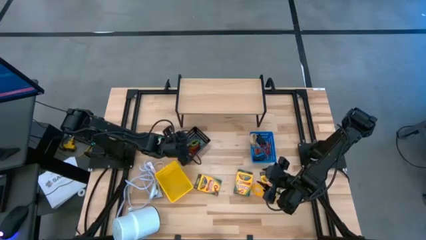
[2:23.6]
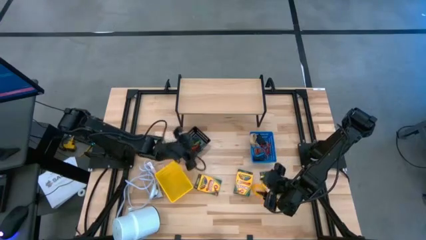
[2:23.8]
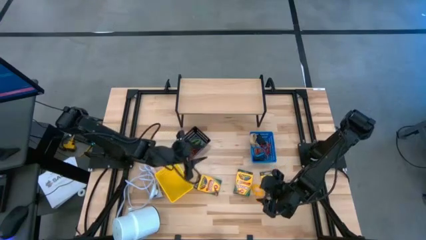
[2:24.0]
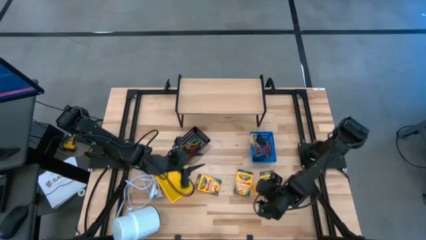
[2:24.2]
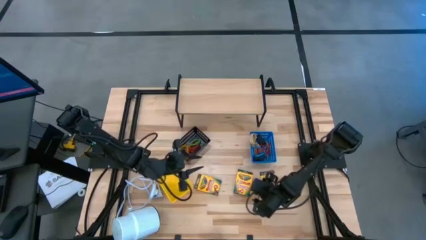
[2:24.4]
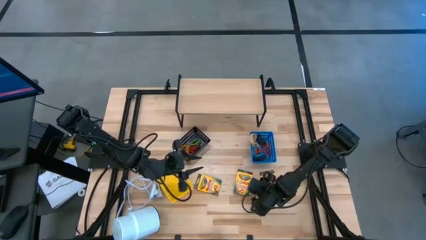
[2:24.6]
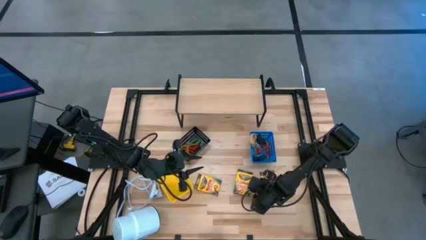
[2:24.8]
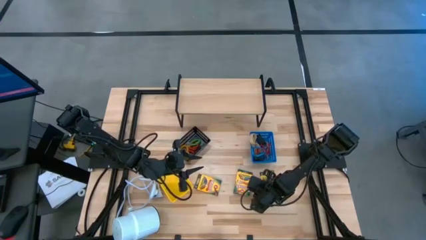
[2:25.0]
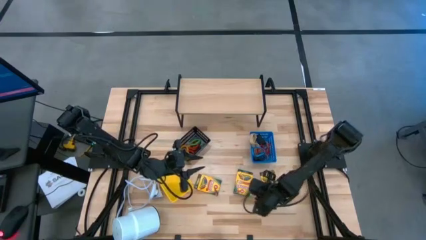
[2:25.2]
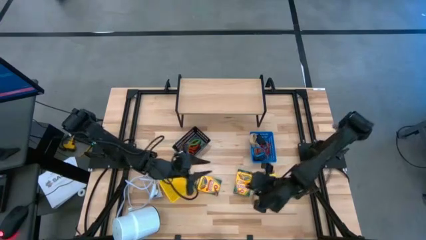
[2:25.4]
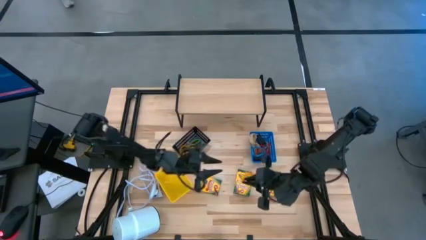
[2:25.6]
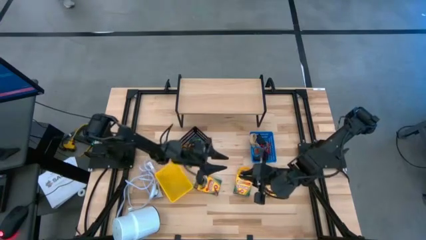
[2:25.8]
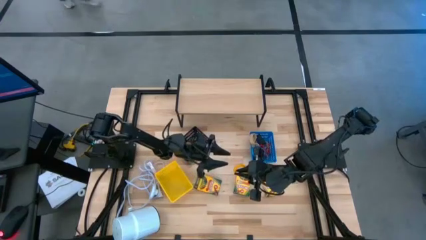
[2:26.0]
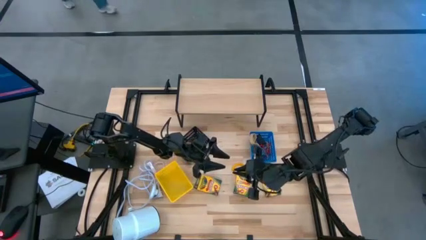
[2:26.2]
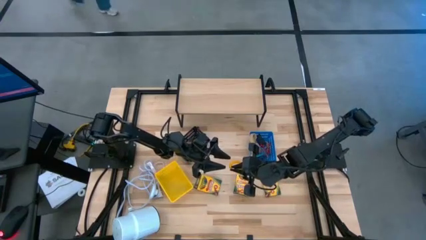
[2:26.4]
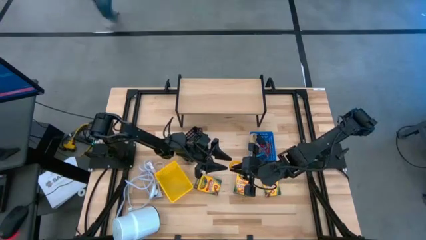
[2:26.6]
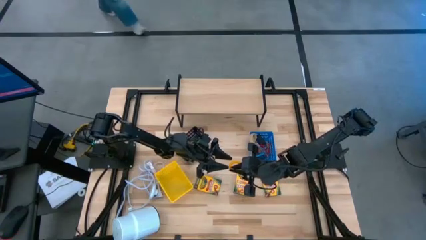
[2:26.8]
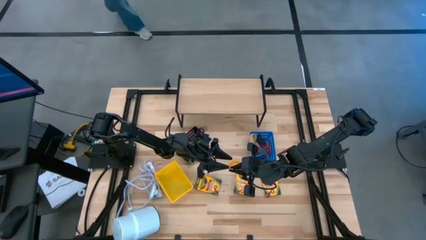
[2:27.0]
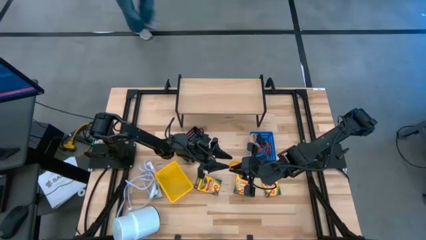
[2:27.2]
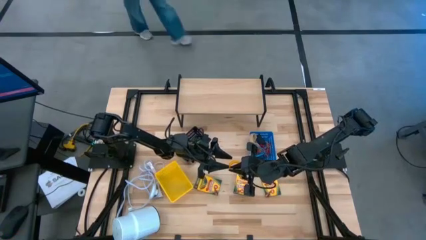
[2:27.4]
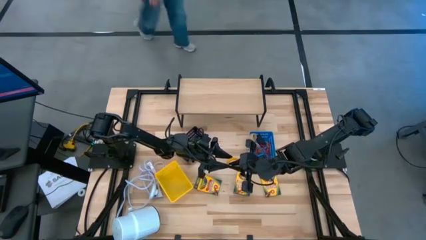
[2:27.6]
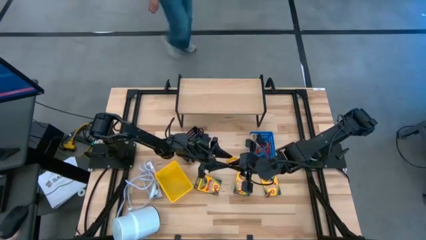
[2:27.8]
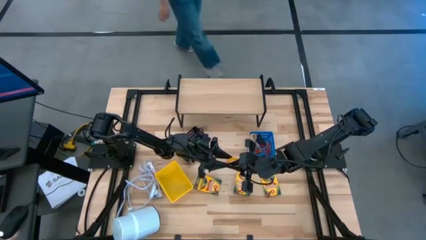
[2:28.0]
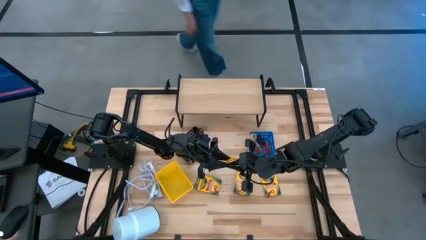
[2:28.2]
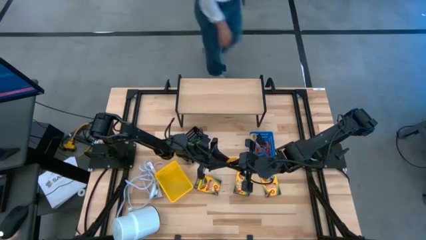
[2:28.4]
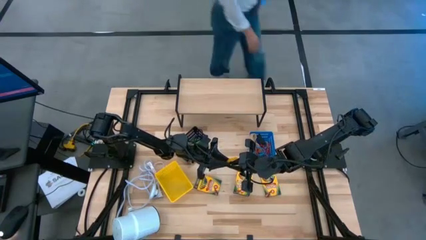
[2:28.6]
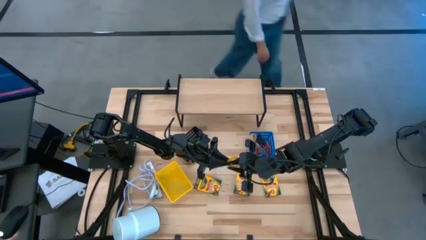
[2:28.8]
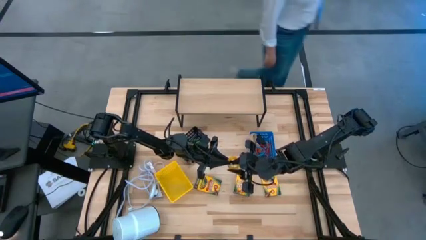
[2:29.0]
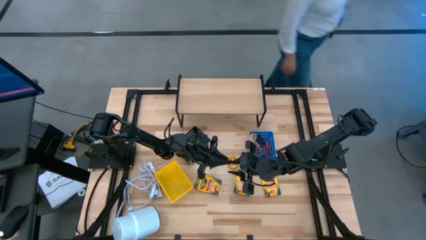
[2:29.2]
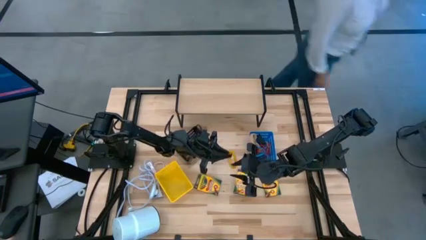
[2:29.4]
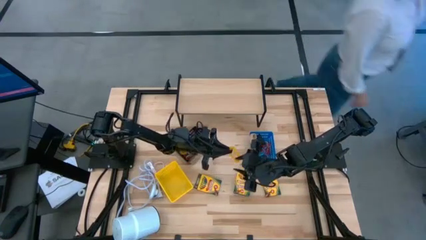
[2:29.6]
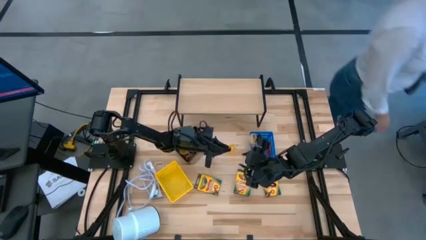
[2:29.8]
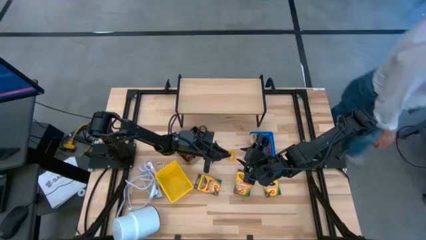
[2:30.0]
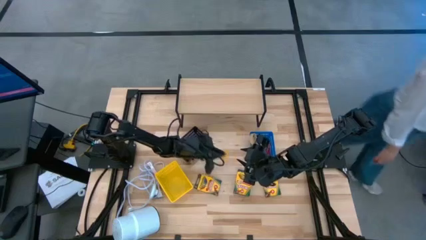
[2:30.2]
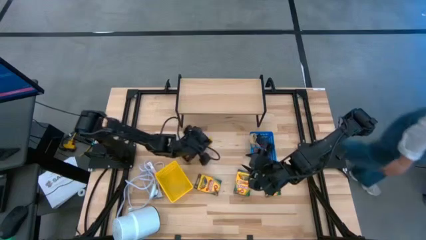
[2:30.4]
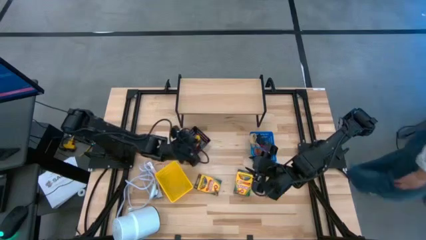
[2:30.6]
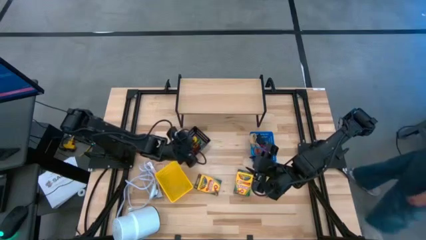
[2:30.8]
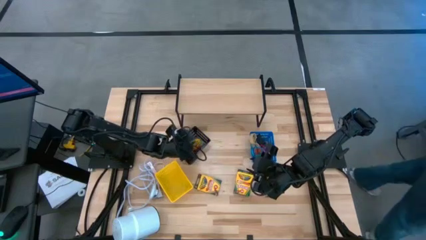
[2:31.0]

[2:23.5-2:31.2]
Task: Pick & Place Office Desk Supplies
Put the yellow spring keychain into the black bin

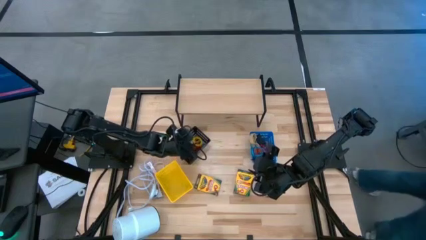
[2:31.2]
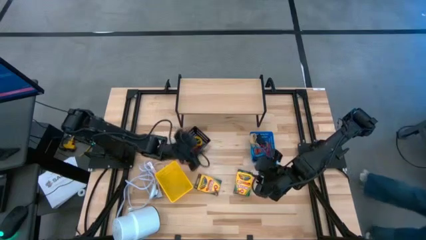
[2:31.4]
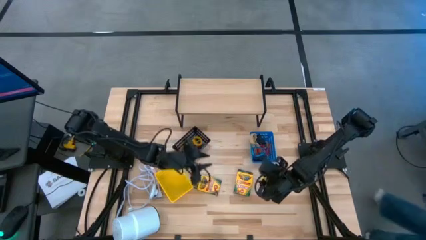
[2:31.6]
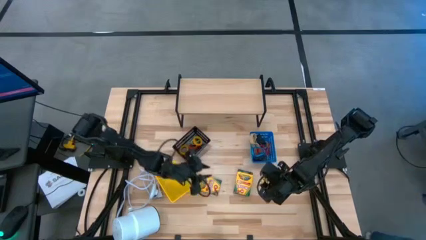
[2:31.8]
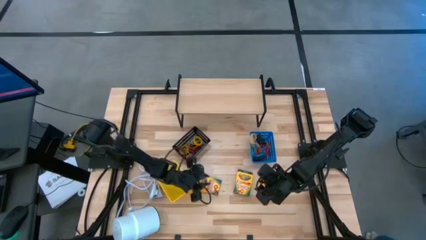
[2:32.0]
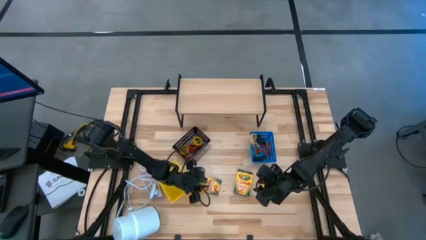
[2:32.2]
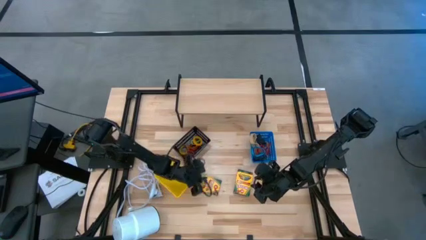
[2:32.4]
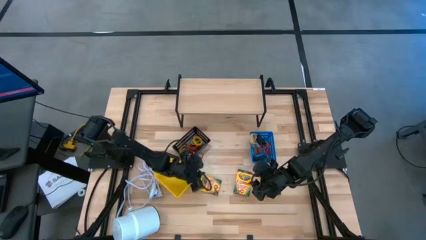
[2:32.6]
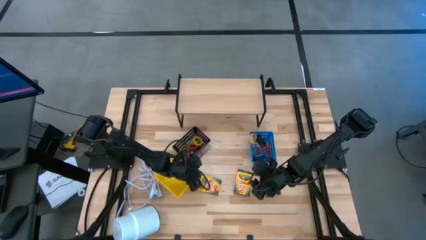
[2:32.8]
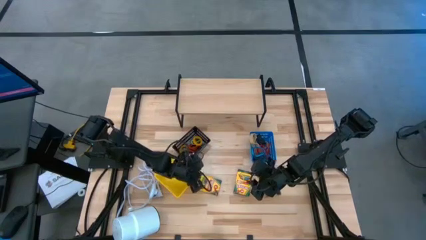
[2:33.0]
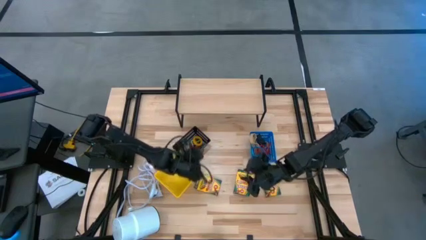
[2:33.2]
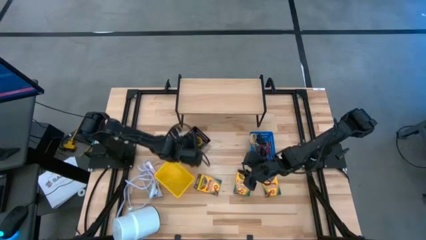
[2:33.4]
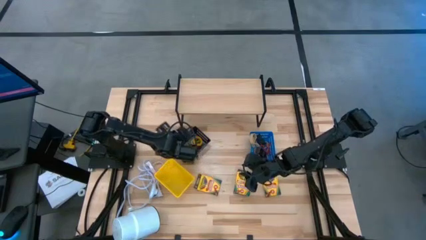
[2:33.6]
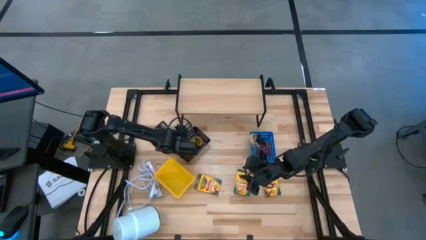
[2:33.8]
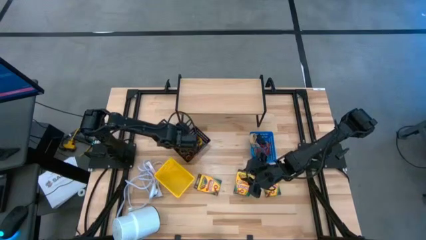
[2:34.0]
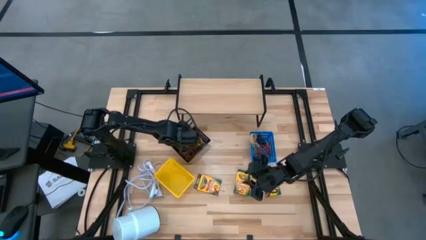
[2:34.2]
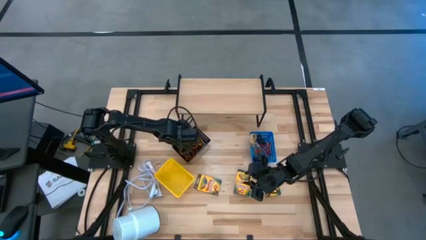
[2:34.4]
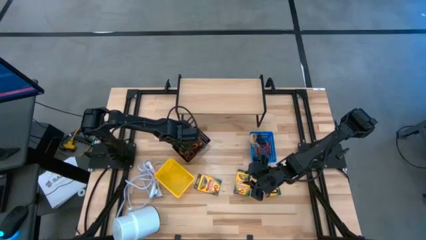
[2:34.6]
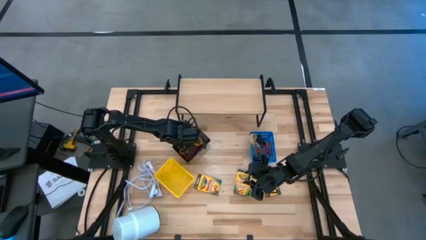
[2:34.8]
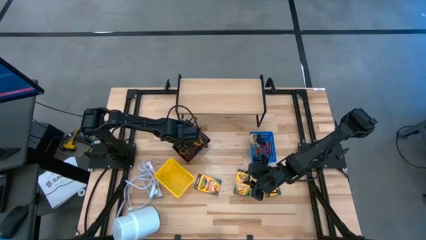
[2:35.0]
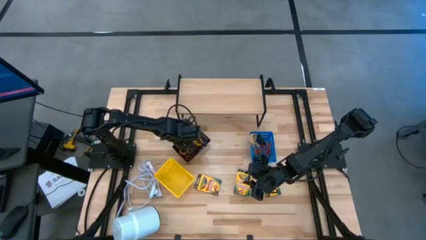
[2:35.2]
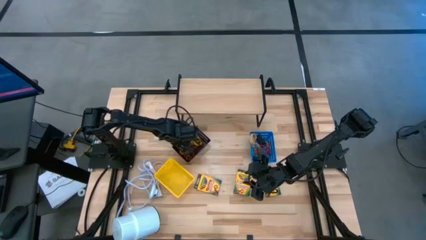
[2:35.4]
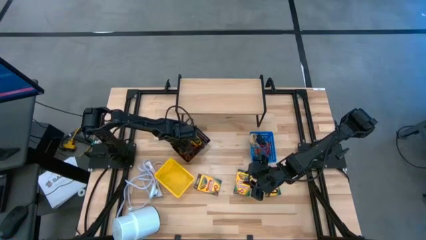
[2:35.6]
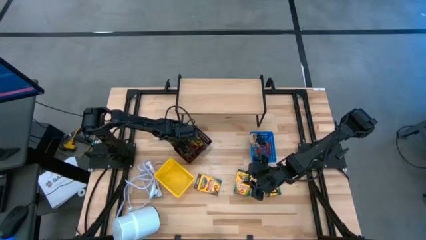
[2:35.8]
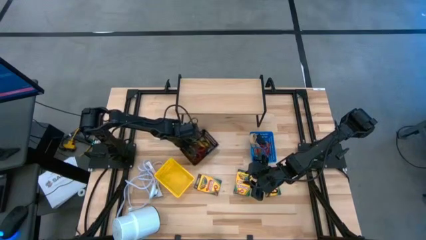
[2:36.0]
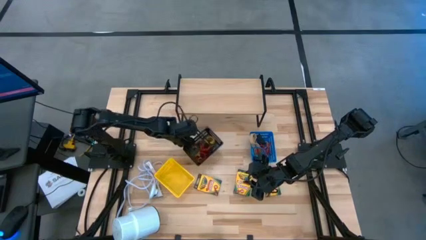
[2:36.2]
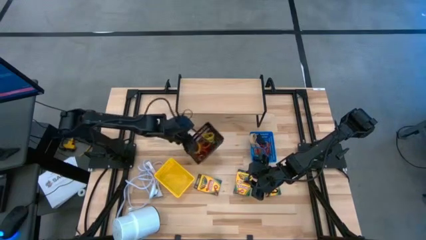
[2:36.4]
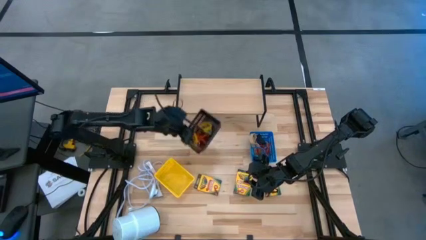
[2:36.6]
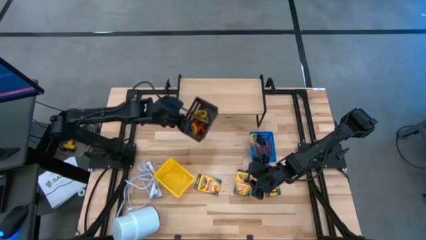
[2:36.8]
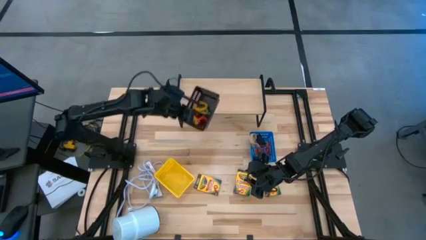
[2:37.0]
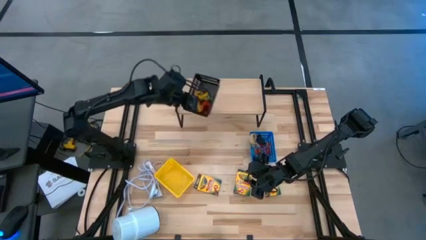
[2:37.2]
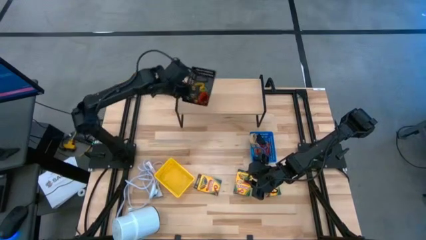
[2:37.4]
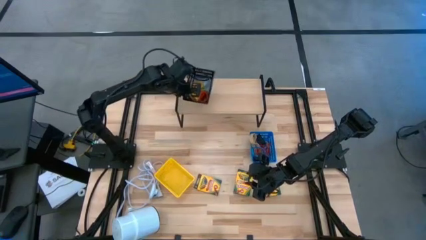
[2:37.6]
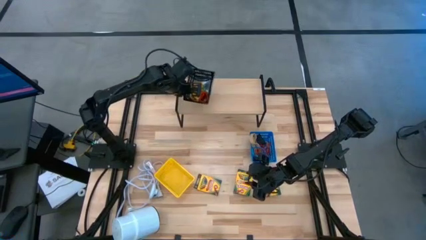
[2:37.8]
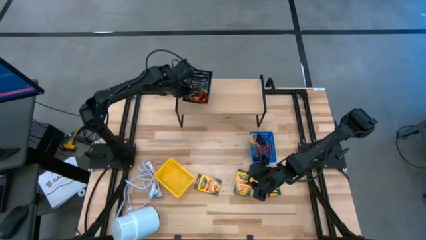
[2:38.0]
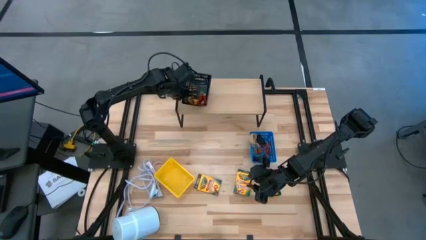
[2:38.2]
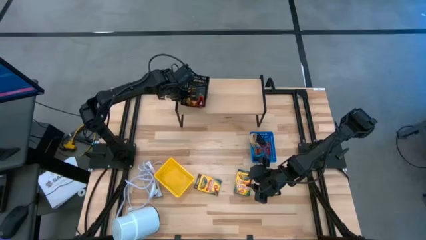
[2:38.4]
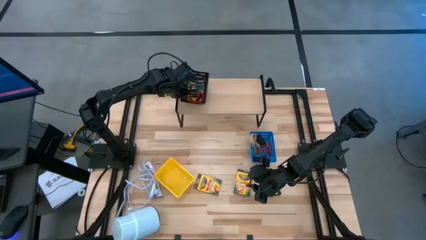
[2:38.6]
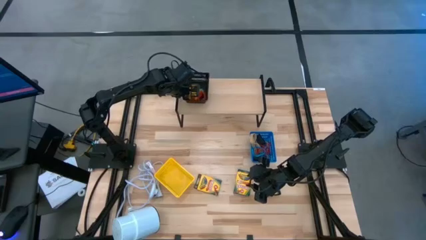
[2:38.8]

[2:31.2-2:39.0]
Put the black bin on the shelf
